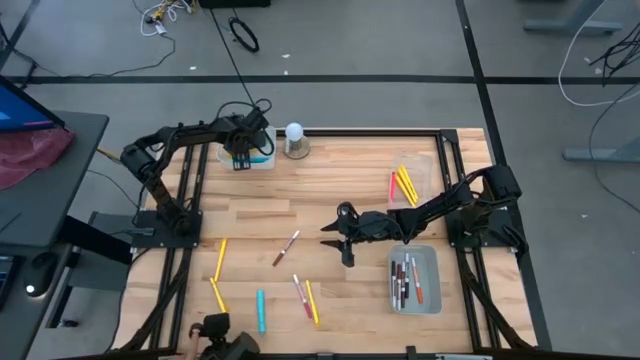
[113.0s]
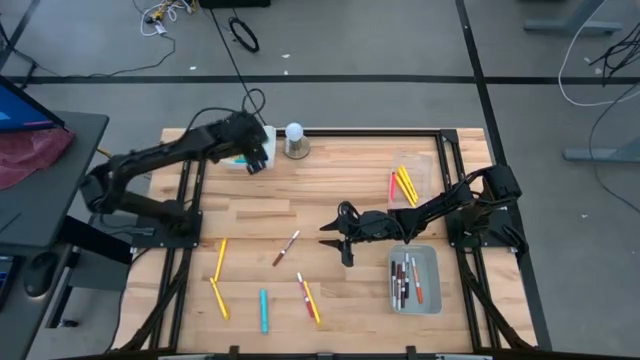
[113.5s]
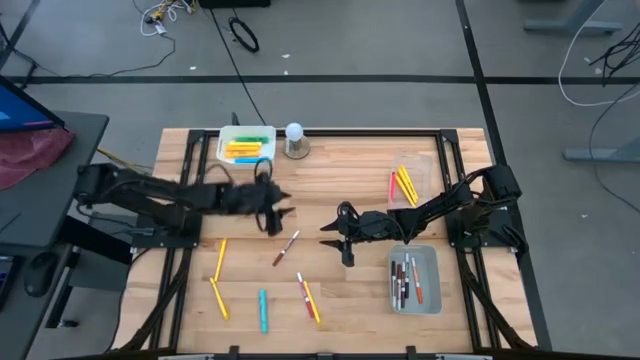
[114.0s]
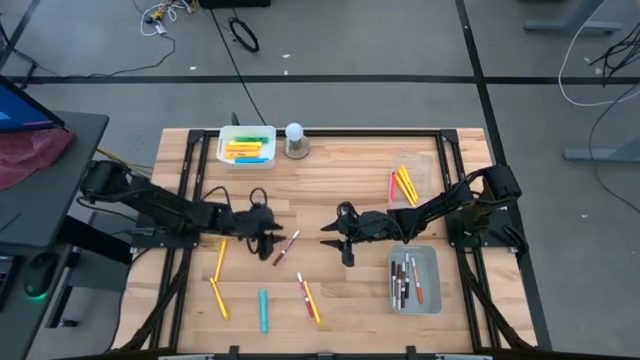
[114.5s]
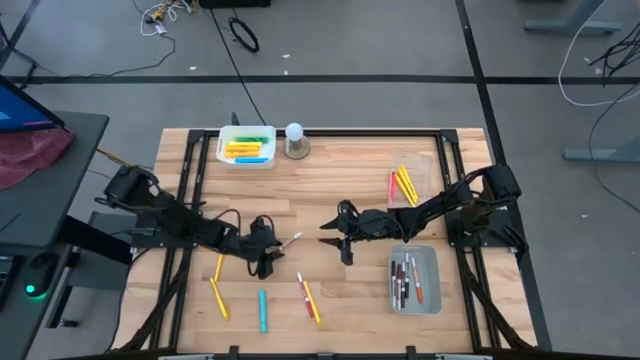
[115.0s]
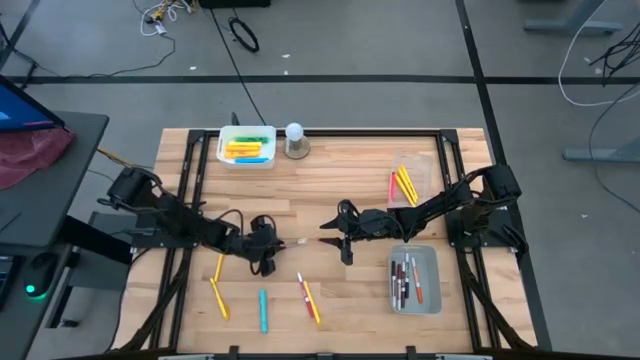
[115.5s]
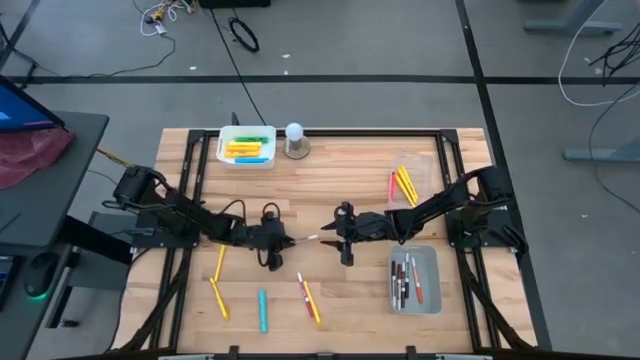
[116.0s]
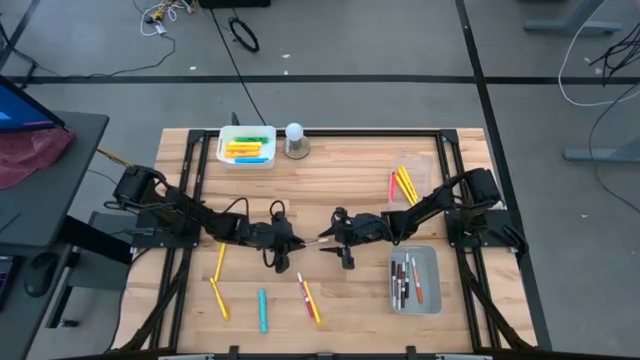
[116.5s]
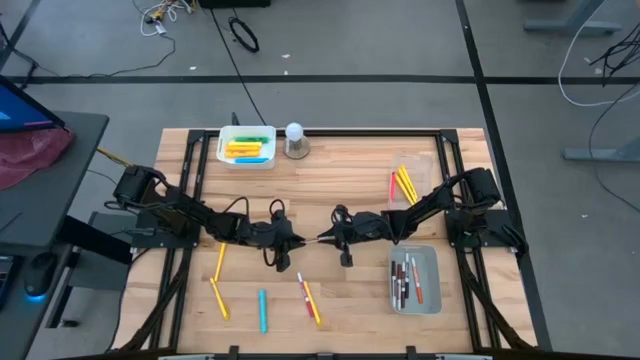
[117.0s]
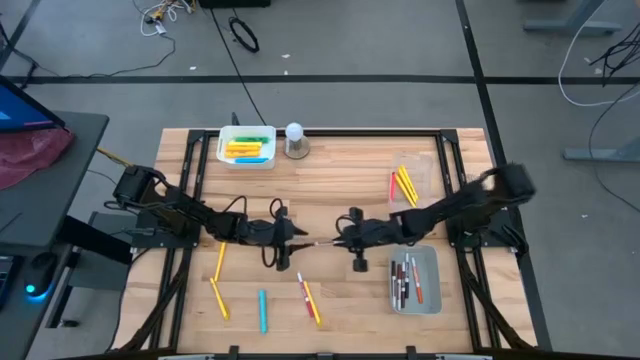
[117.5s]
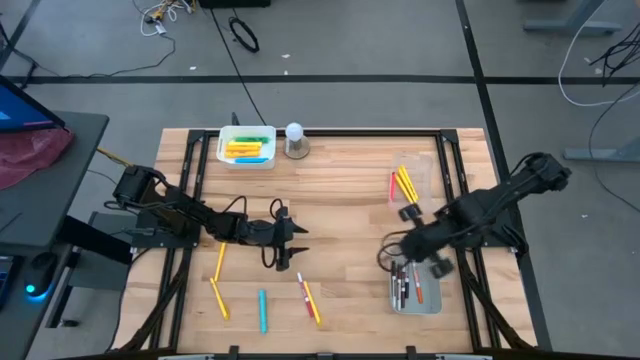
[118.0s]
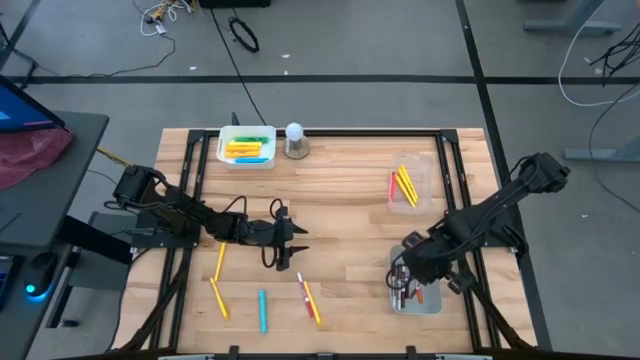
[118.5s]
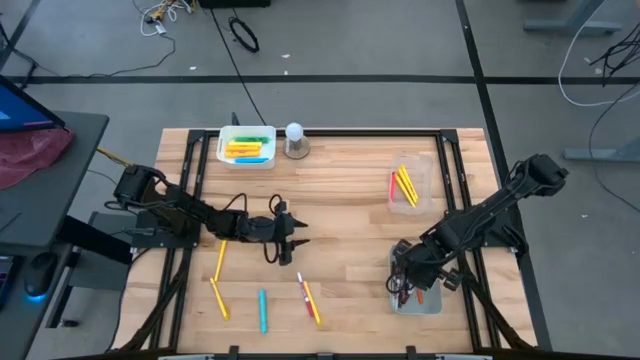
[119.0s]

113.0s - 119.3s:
Task: Pick & Place Markers
Put the light brown marker pen into the gray bin

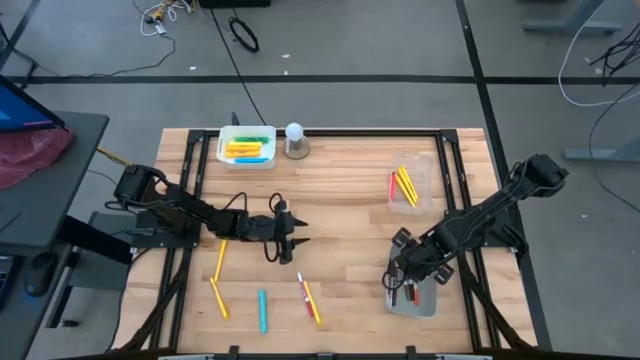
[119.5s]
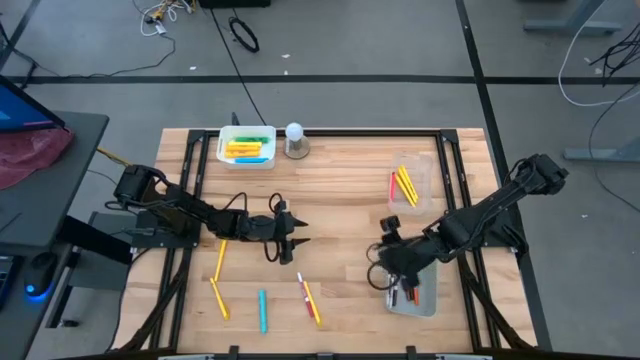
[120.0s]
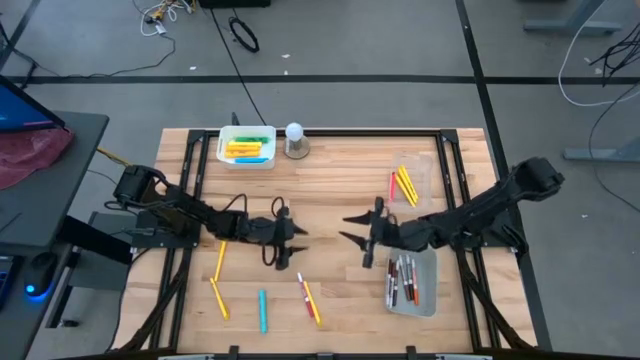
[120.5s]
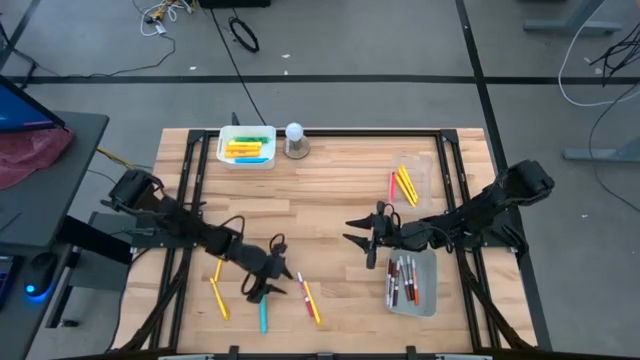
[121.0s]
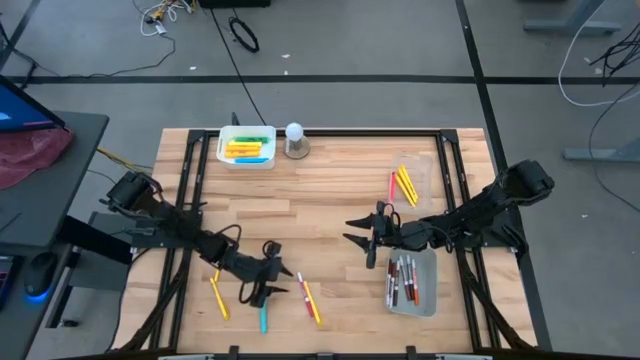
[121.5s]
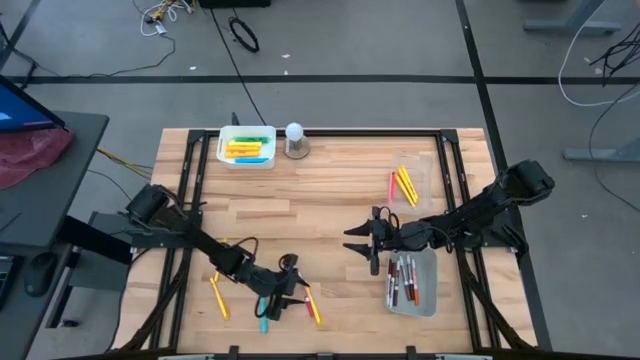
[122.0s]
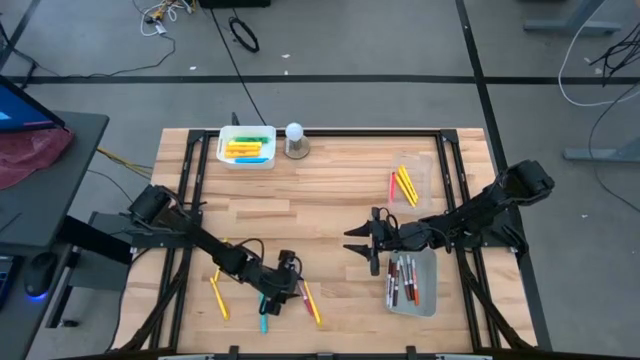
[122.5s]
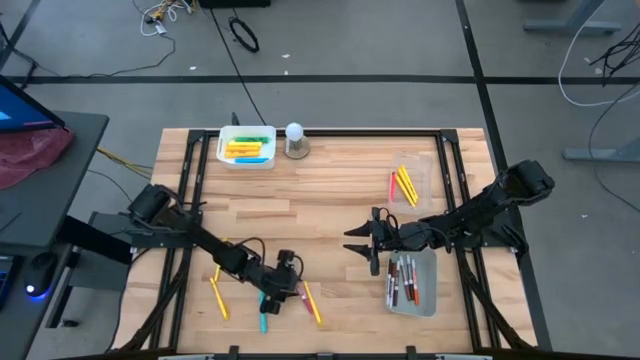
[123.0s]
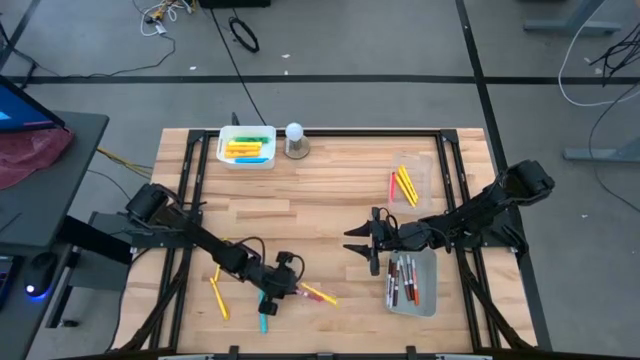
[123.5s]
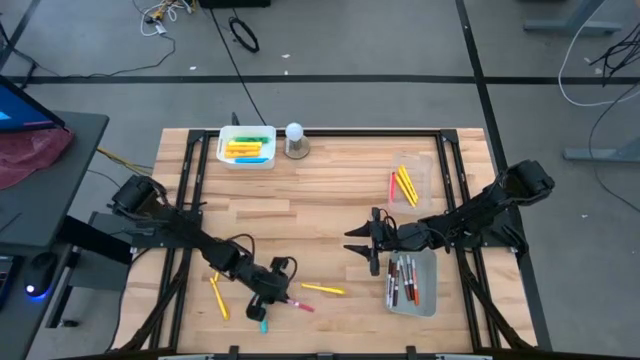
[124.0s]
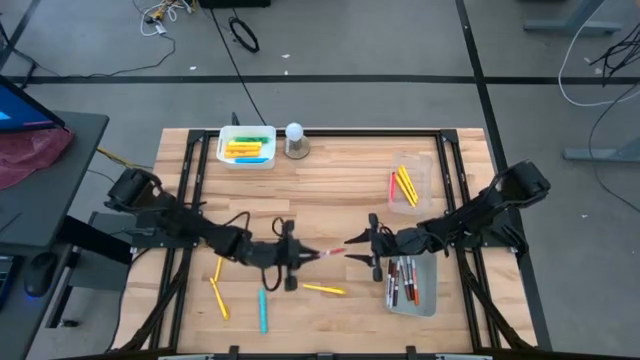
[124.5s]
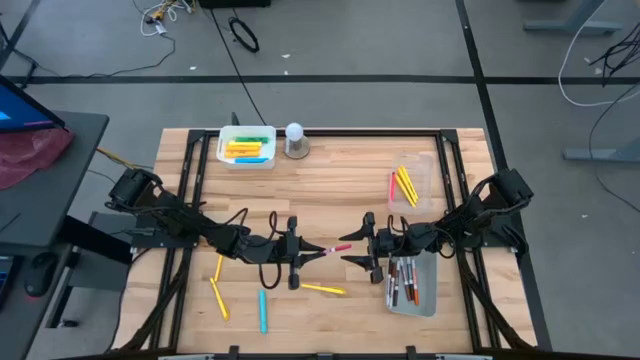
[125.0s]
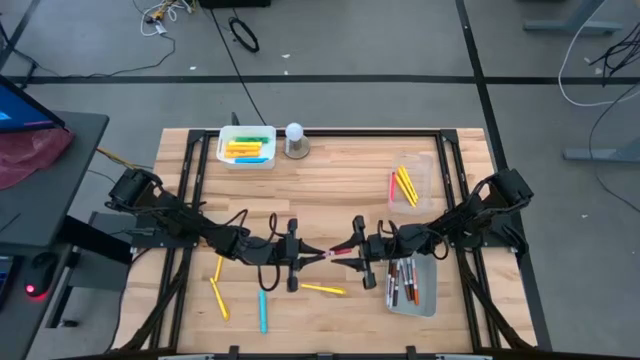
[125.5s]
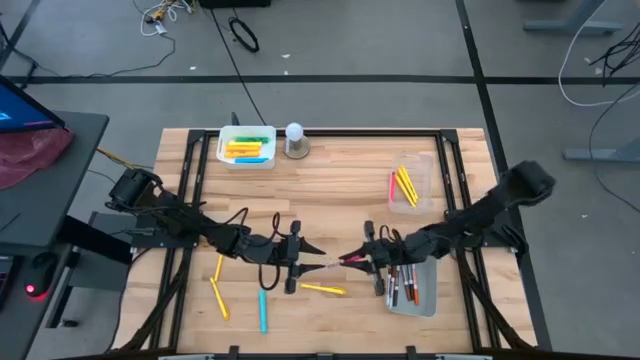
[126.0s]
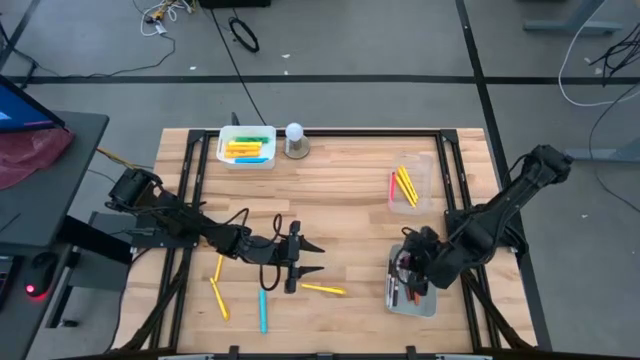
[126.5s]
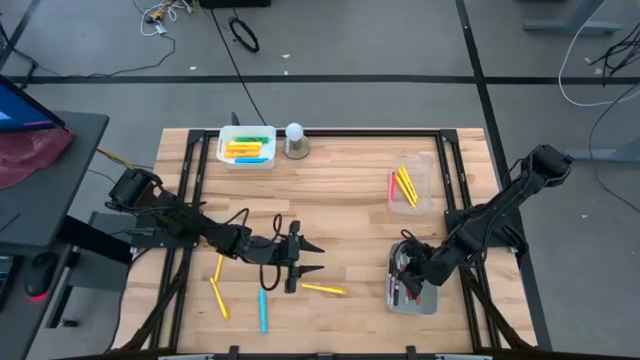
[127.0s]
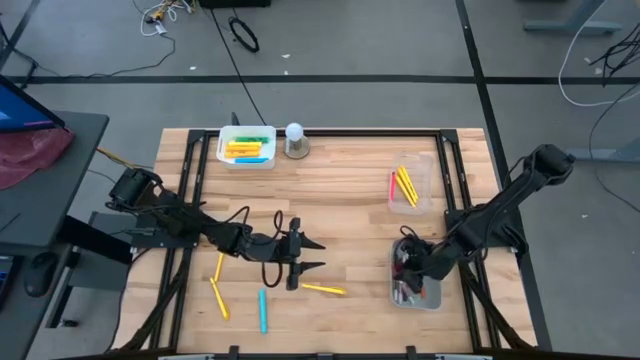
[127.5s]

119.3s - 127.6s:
Put the pink marker pen into the gray bin

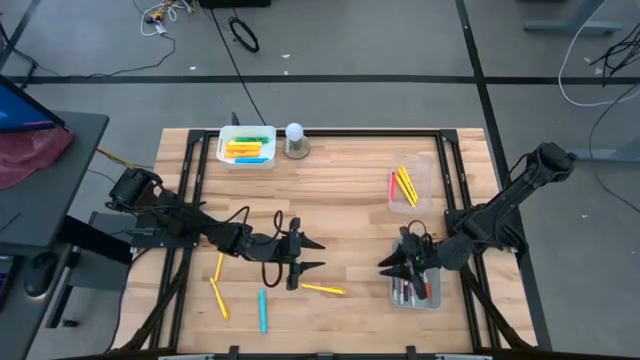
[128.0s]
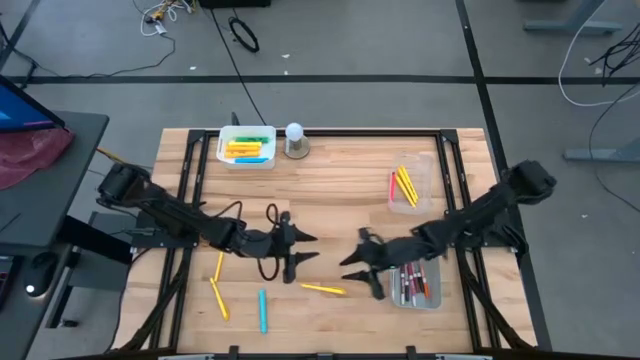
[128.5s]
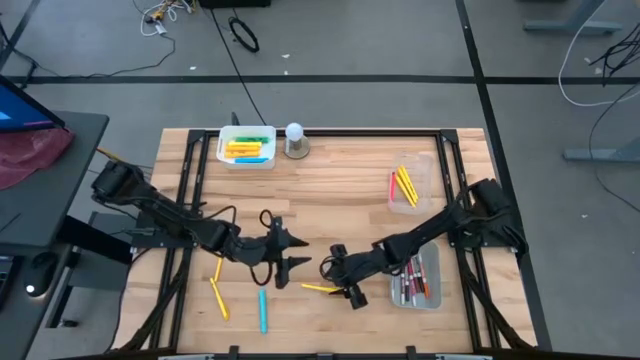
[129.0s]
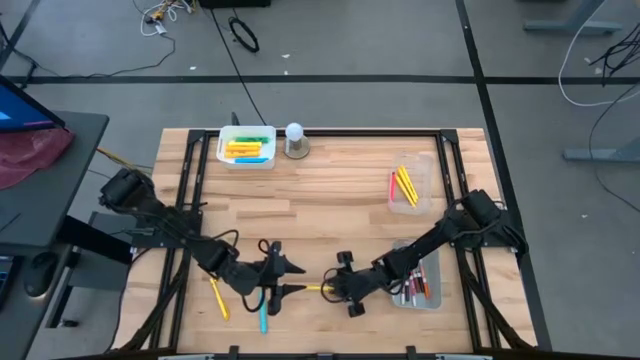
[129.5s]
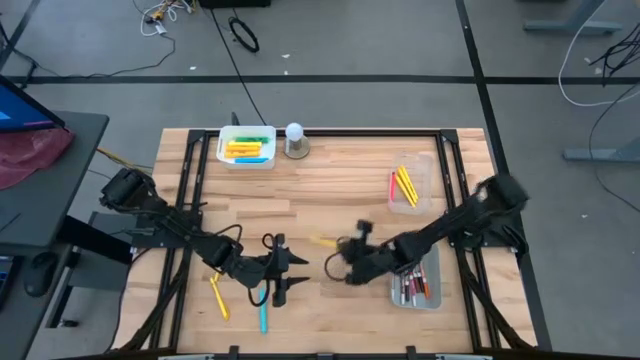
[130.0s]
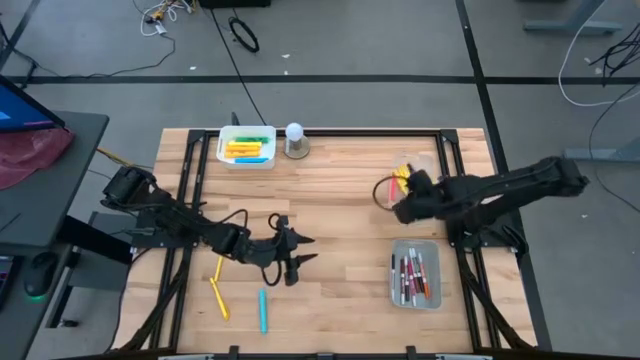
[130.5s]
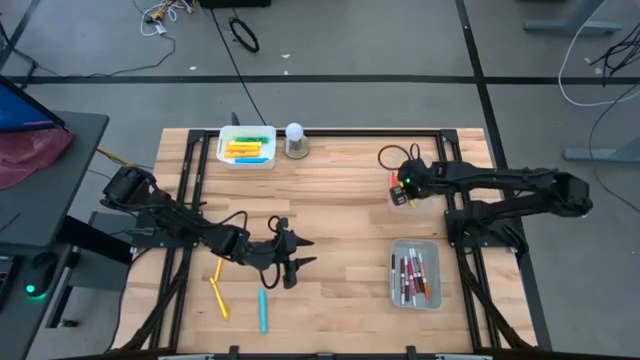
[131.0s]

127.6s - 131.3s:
Put the yellow pen into the transparent bin

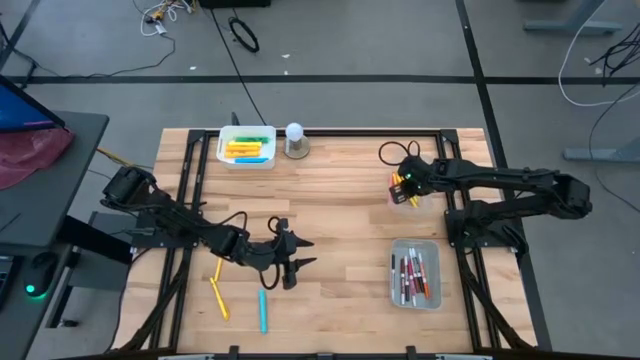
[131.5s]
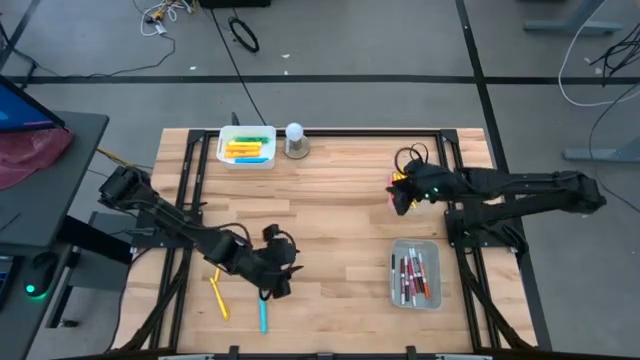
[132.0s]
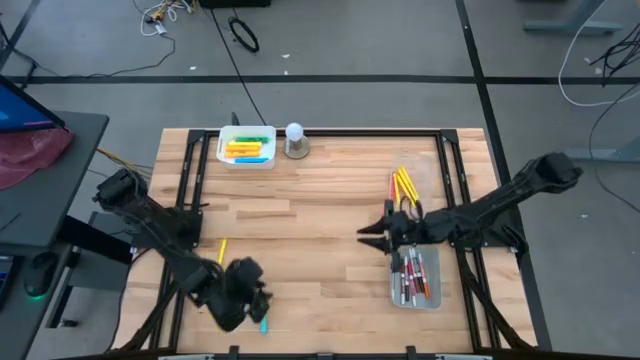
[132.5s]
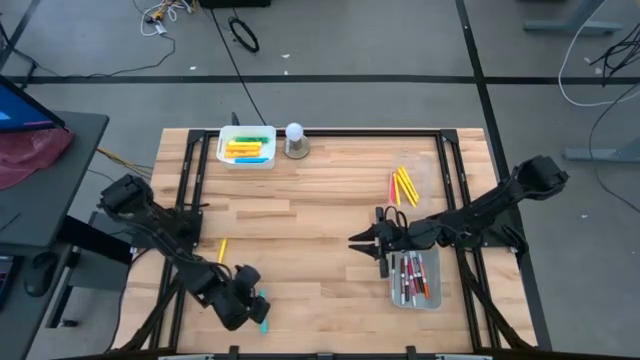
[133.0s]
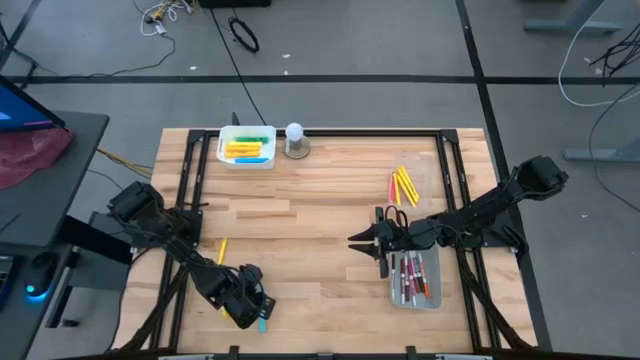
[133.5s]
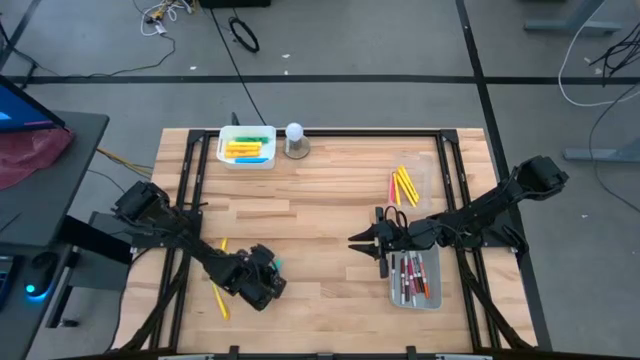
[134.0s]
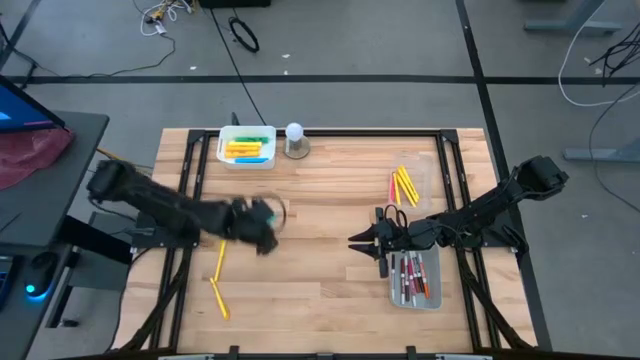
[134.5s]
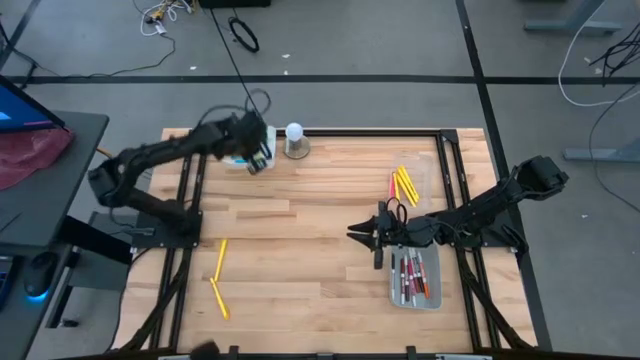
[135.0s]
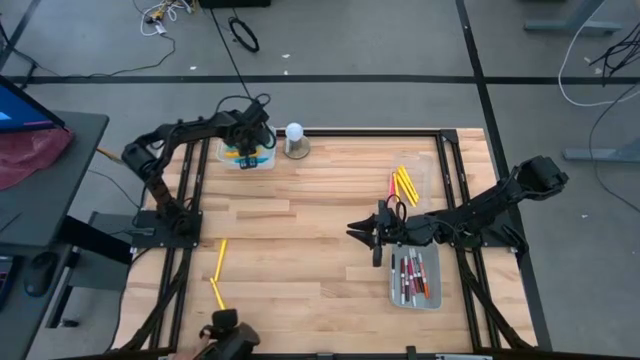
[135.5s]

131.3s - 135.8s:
Put the blue highlighter into the white bin
